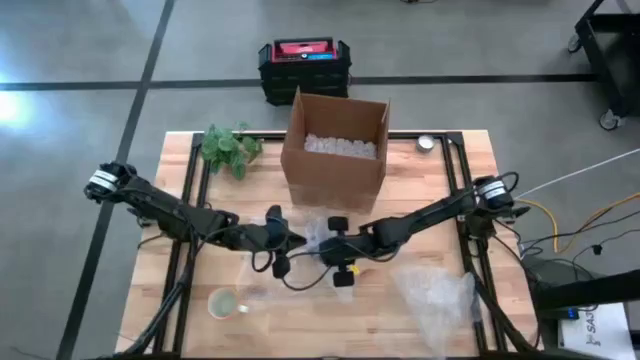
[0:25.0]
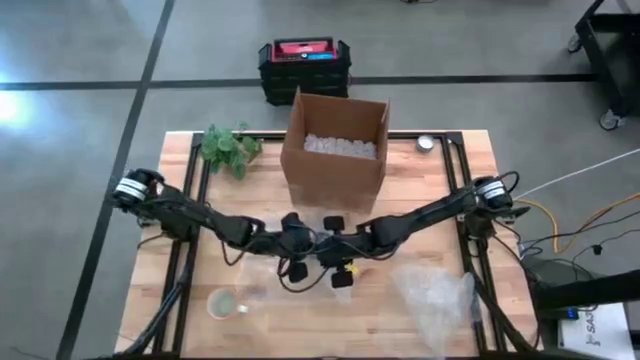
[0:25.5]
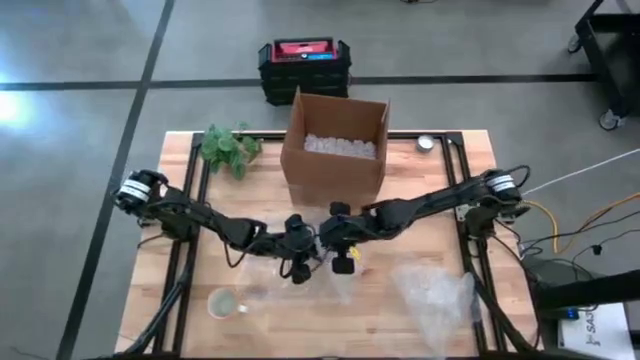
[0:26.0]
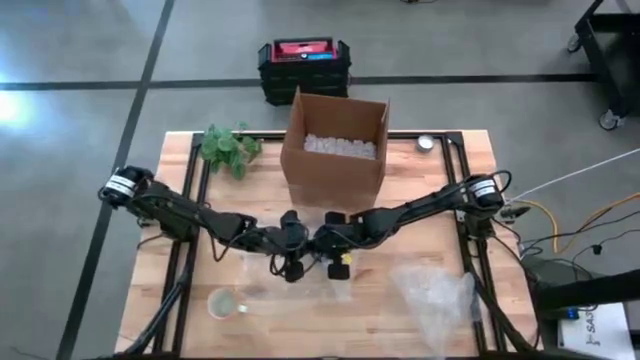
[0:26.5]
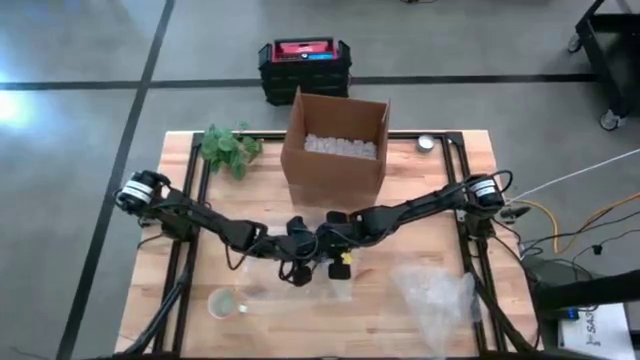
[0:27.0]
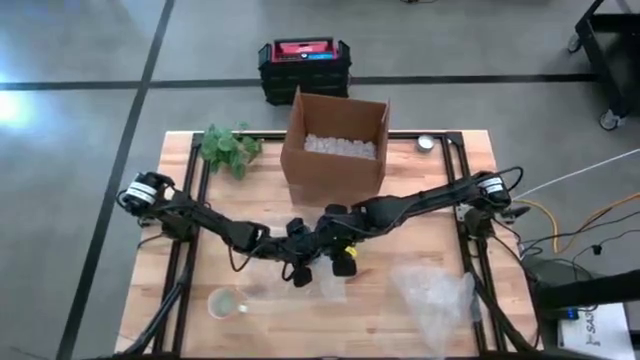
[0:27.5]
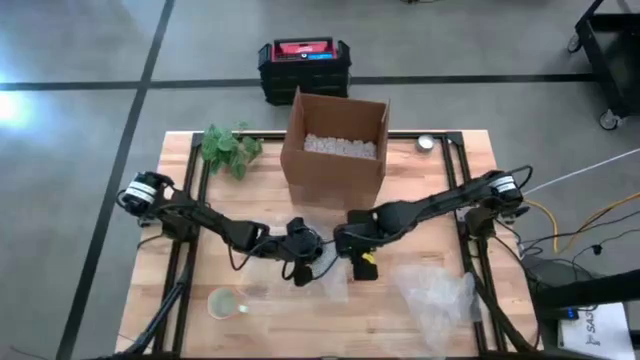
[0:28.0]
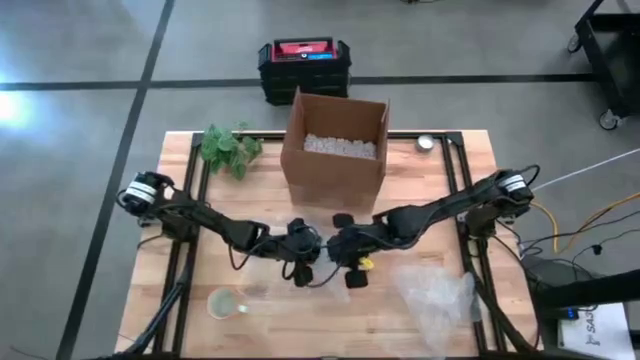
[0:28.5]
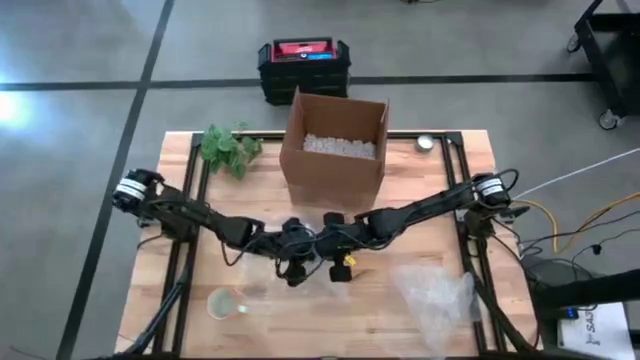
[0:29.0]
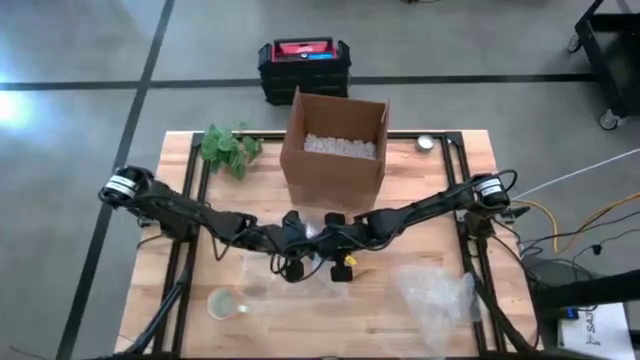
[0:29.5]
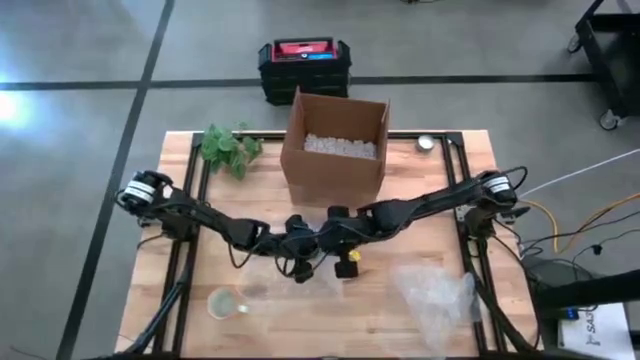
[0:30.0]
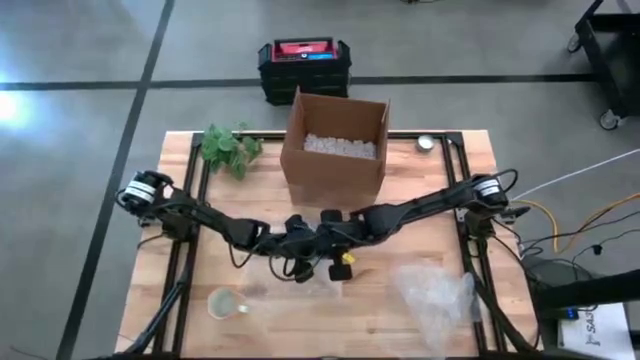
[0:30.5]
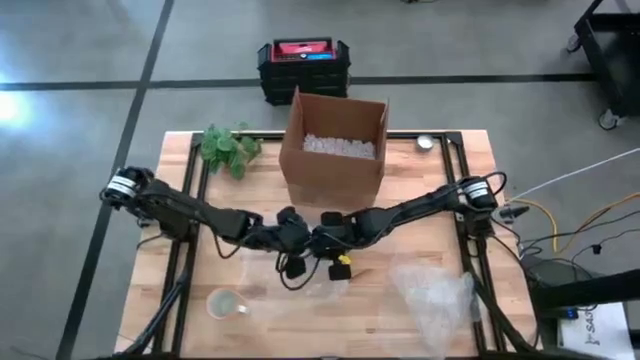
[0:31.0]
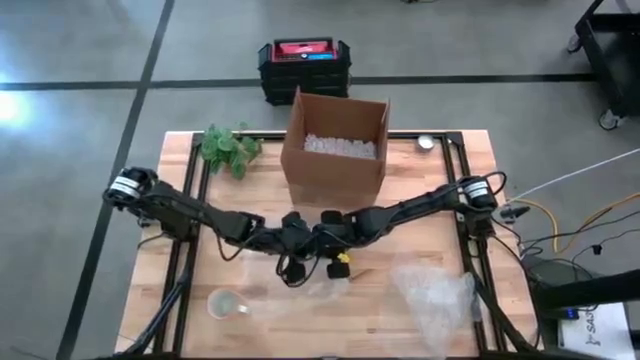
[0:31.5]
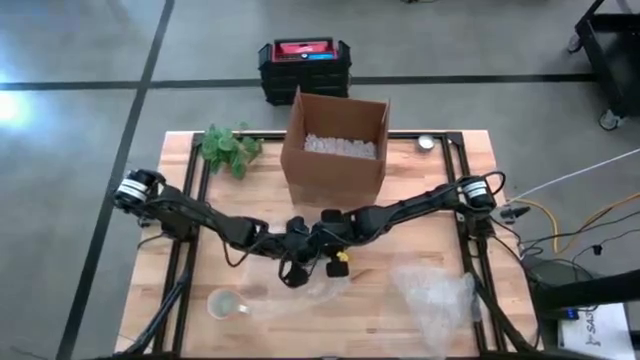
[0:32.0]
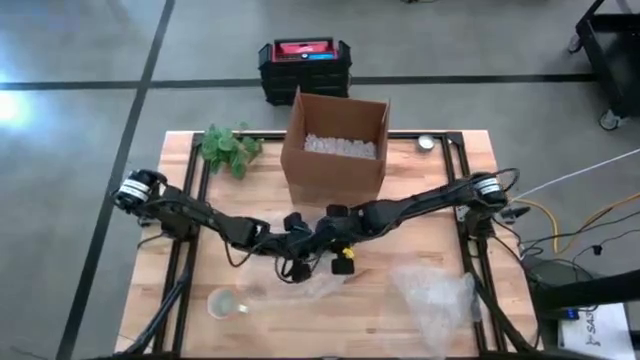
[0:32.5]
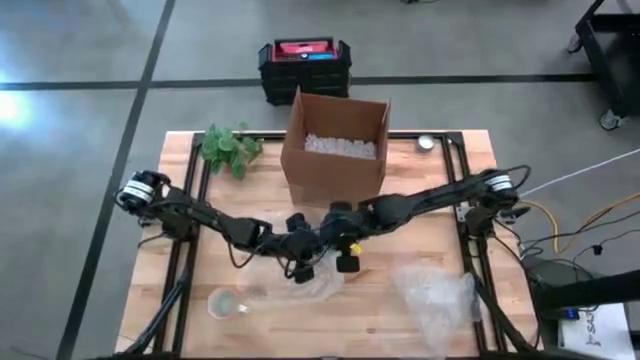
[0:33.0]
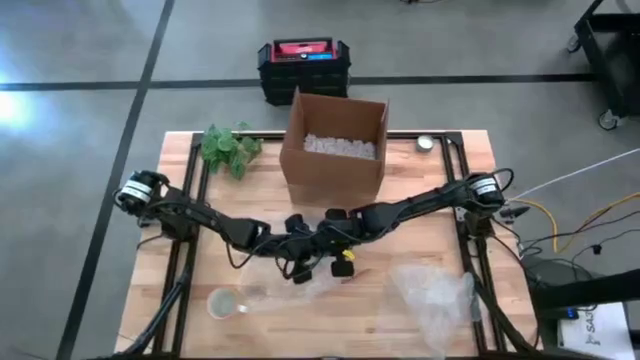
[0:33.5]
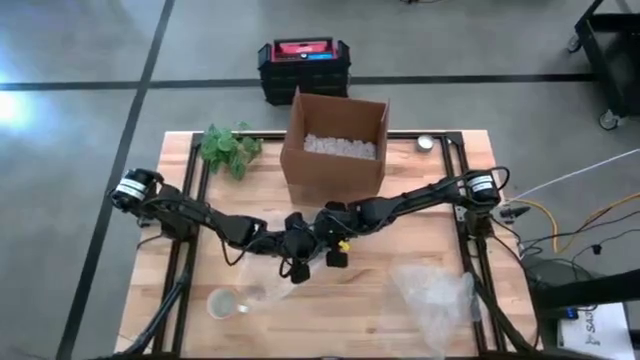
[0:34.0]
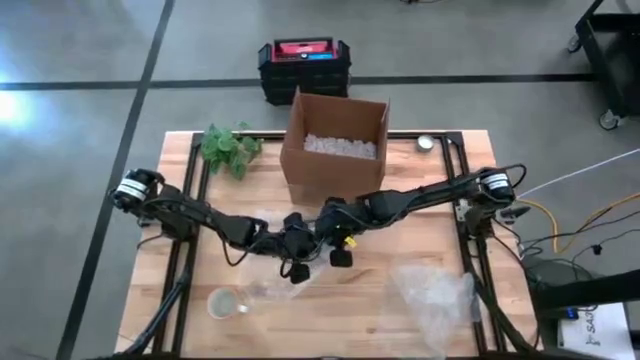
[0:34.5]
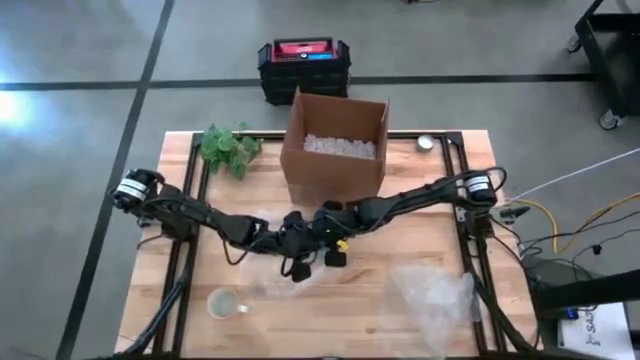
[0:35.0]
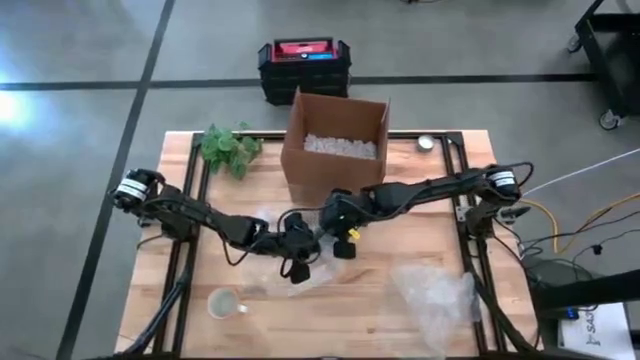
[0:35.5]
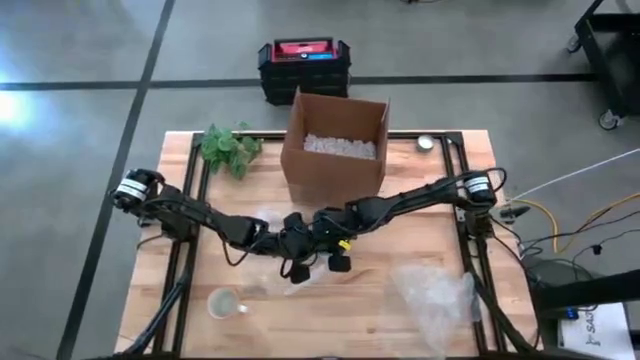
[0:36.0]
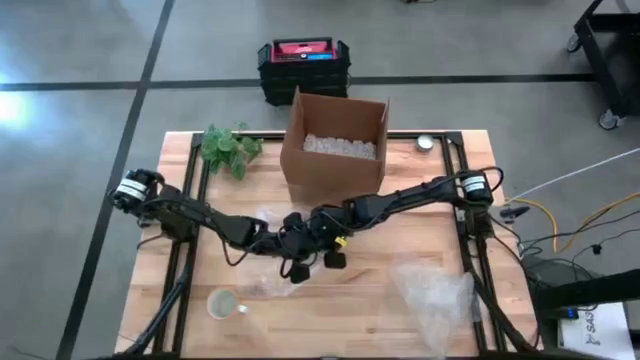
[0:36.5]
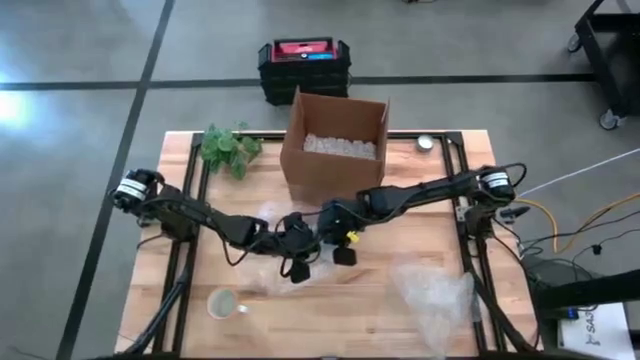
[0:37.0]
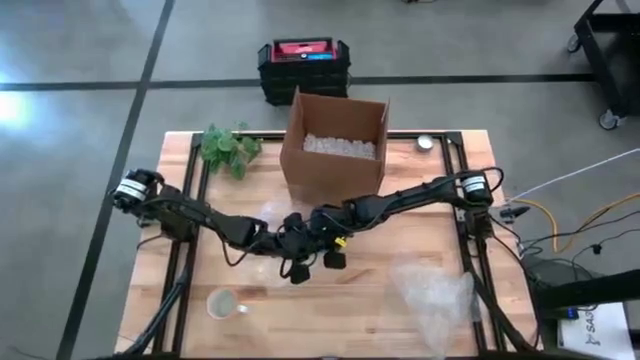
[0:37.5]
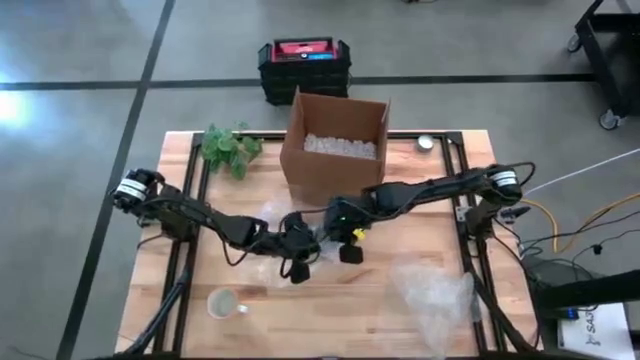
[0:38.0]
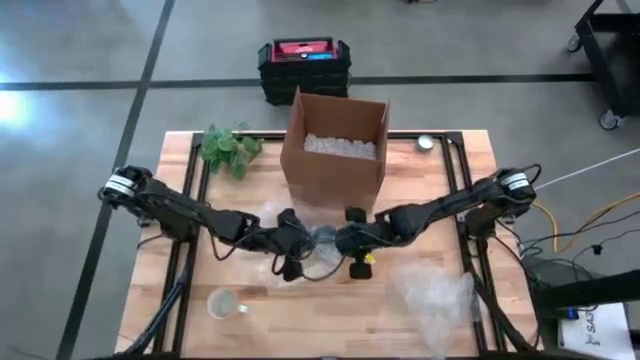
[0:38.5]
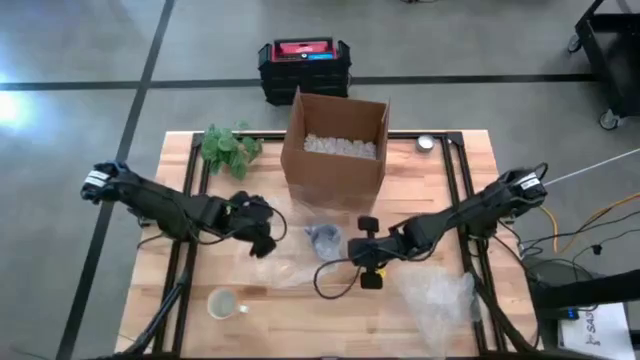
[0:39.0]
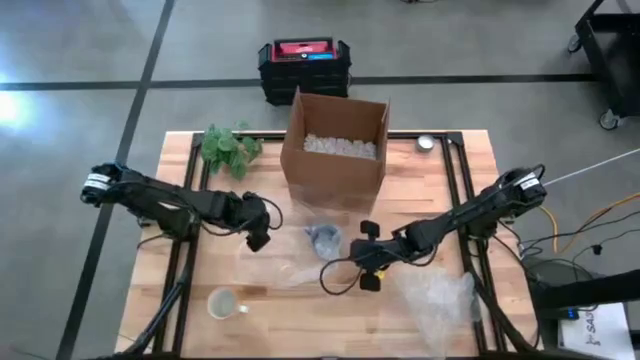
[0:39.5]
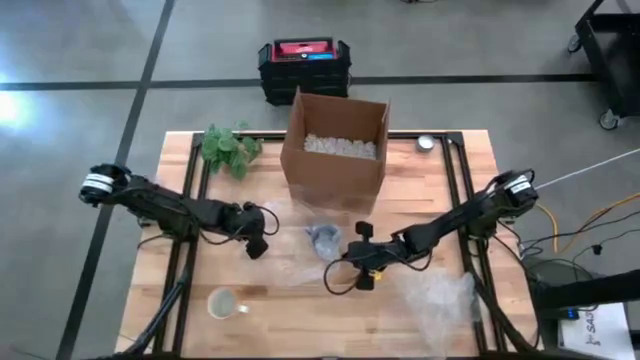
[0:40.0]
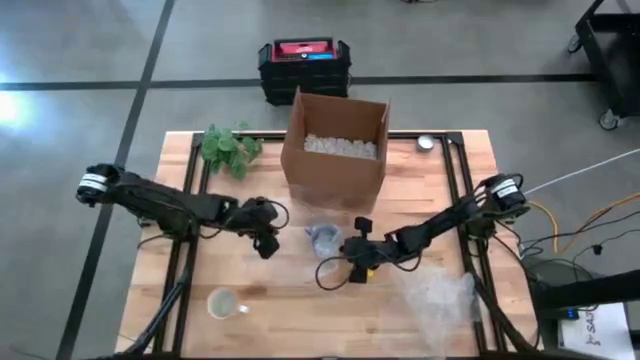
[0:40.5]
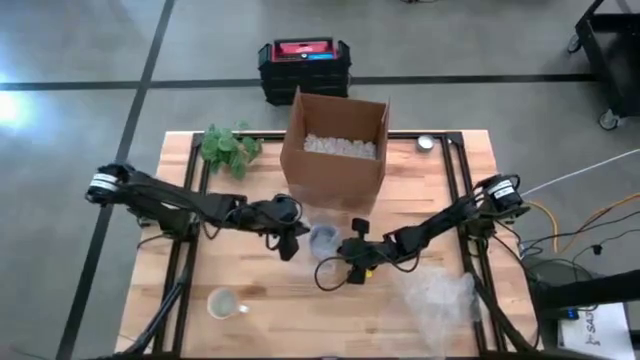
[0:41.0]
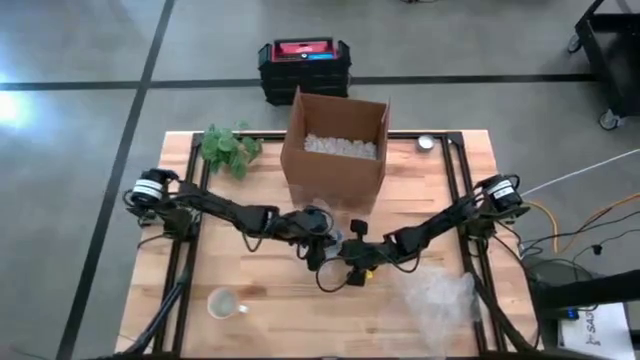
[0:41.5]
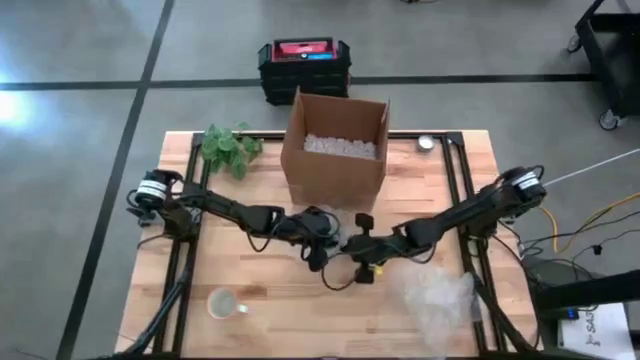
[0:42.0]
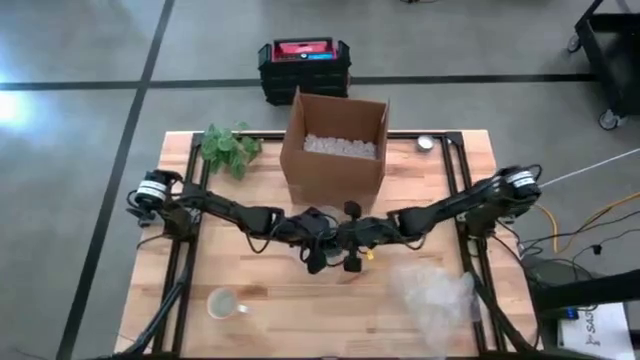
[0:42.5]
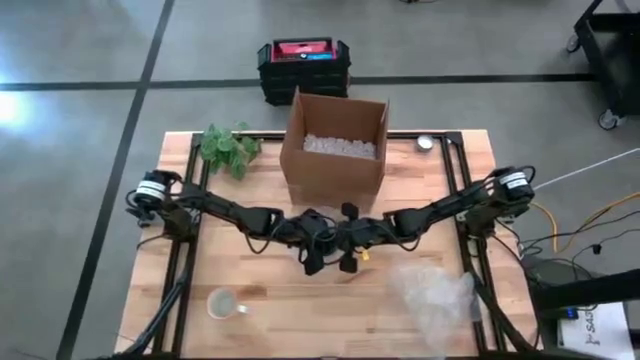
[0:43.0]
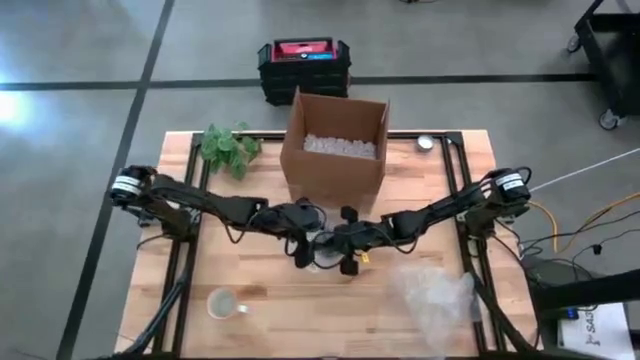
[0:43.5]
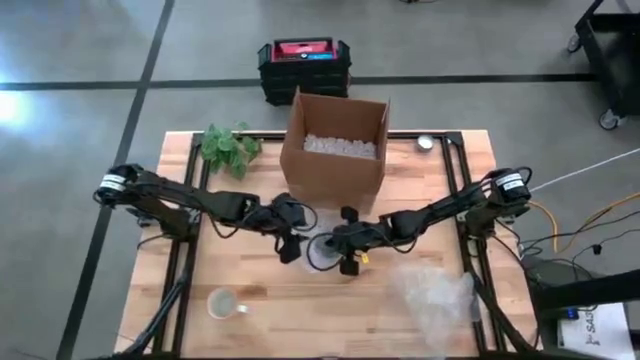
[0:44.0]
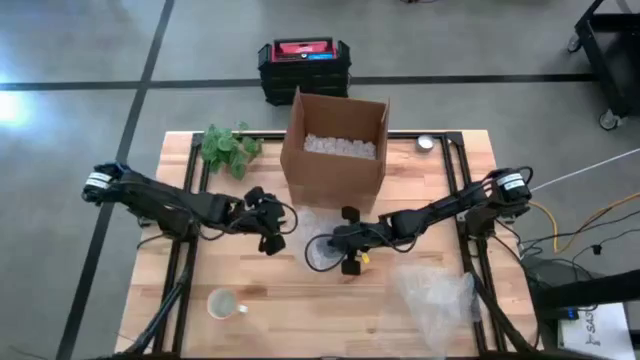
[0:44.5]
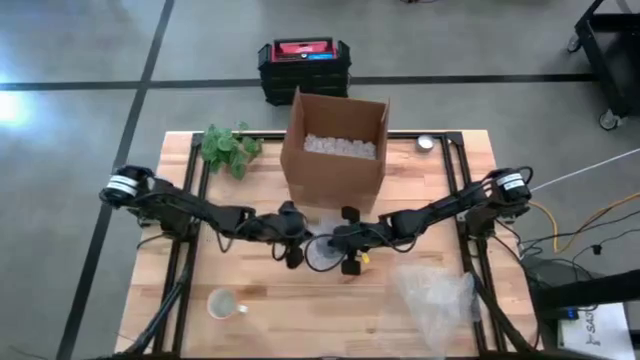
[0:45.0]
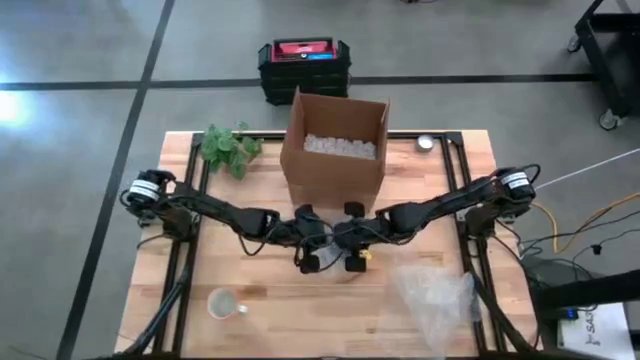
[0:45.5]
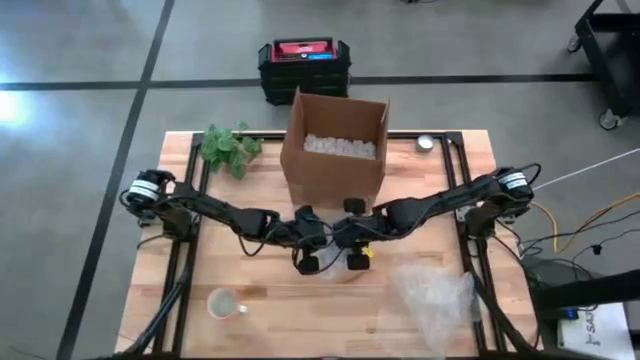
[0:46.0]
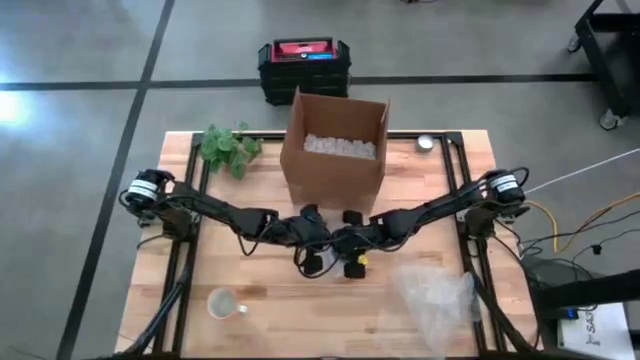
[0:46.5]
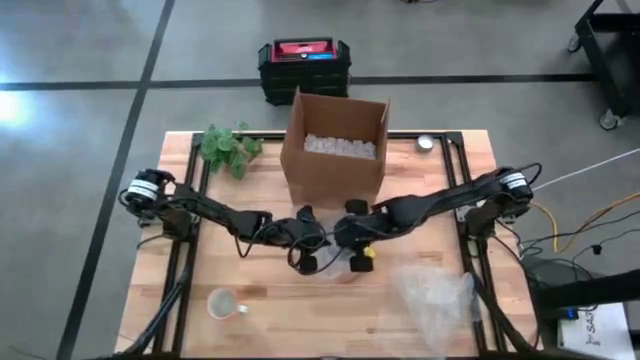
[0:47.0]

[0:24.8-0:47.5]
Task: wrap mug
Wrap the blue cup in bubble wrap
